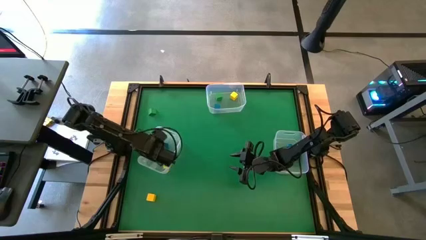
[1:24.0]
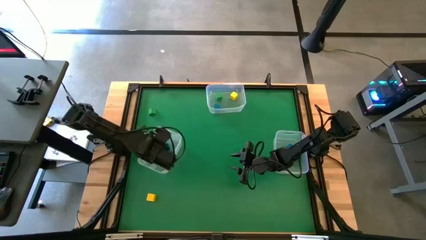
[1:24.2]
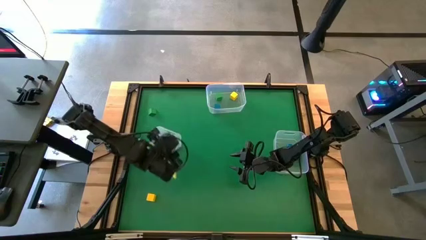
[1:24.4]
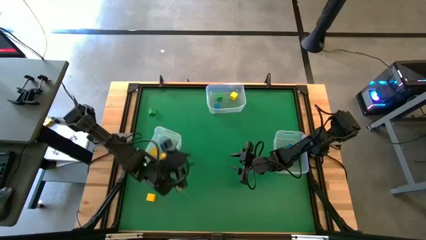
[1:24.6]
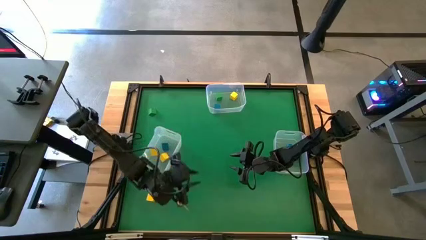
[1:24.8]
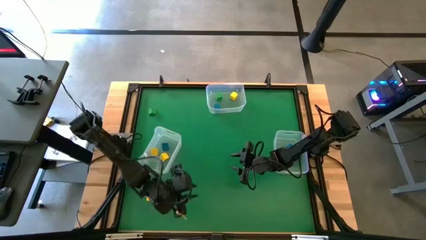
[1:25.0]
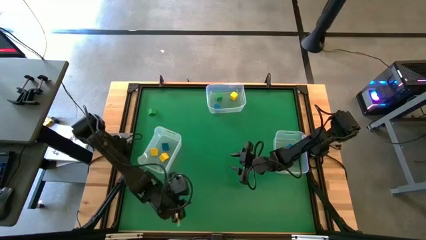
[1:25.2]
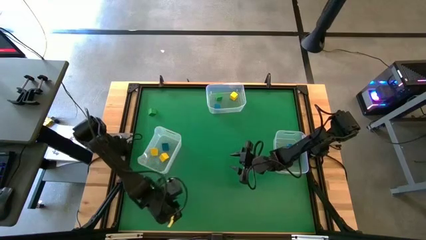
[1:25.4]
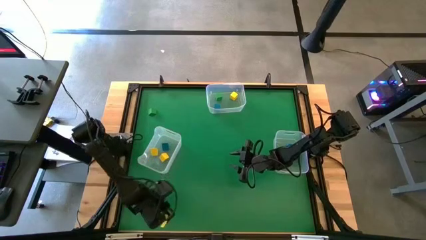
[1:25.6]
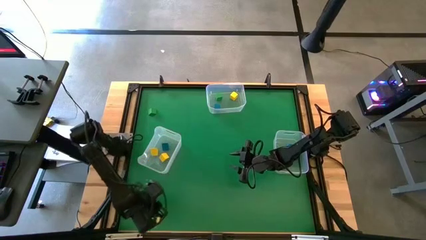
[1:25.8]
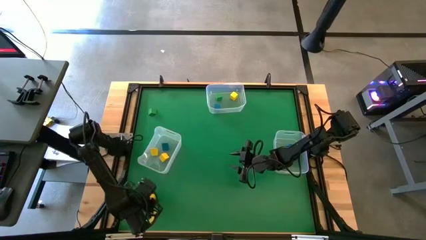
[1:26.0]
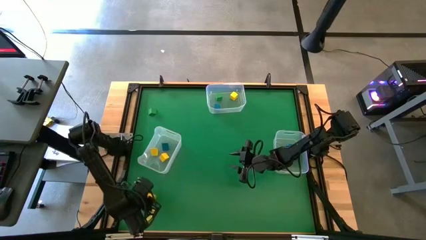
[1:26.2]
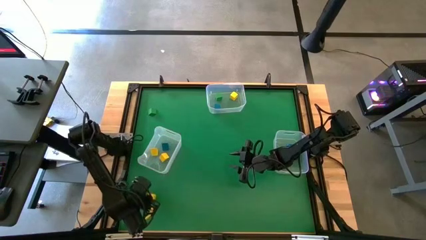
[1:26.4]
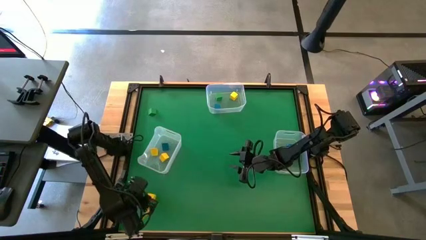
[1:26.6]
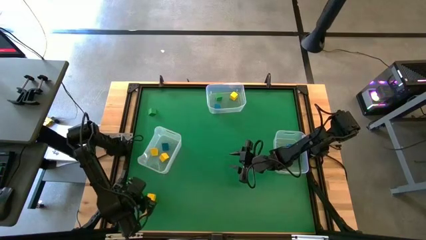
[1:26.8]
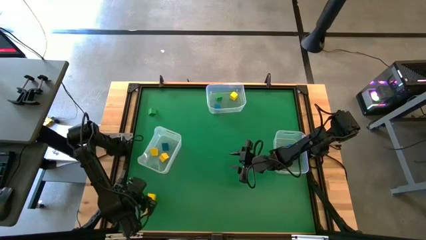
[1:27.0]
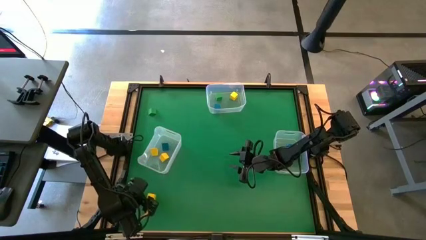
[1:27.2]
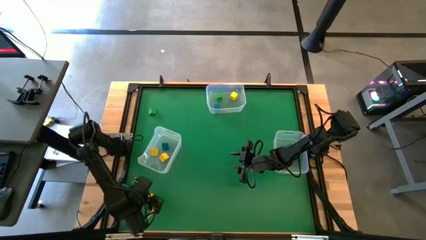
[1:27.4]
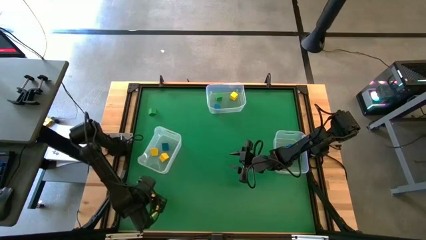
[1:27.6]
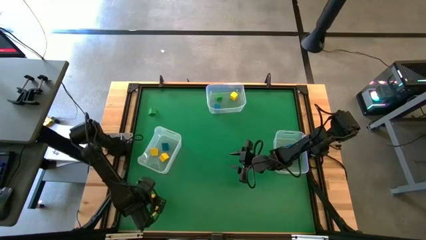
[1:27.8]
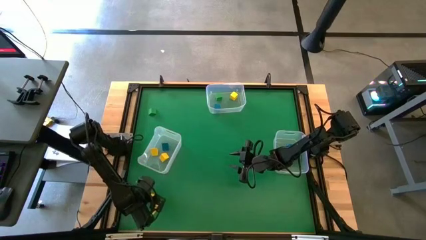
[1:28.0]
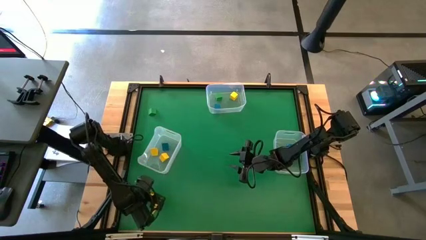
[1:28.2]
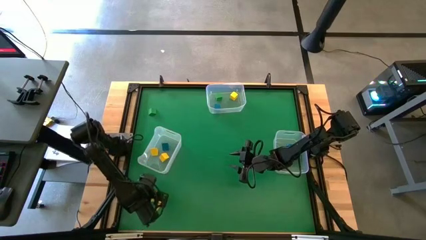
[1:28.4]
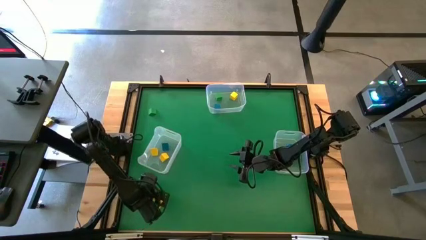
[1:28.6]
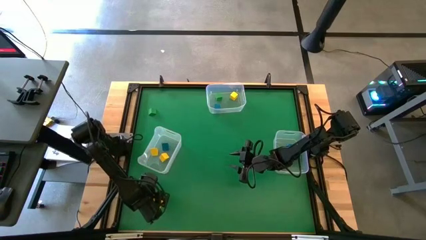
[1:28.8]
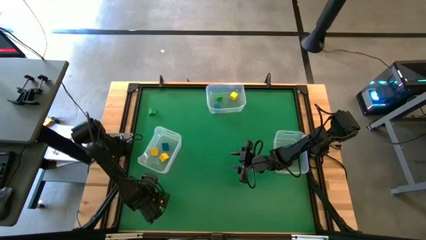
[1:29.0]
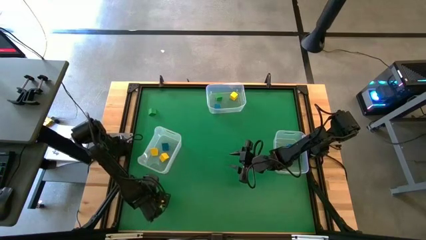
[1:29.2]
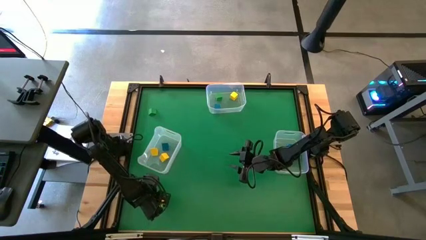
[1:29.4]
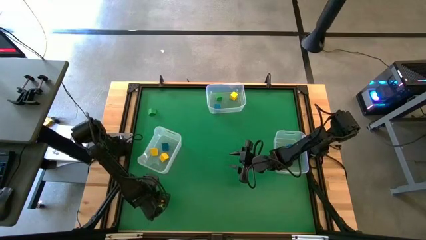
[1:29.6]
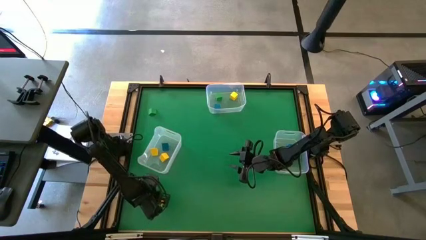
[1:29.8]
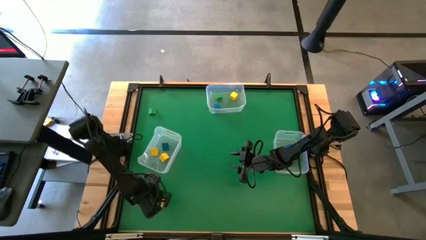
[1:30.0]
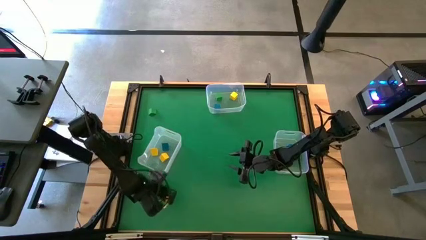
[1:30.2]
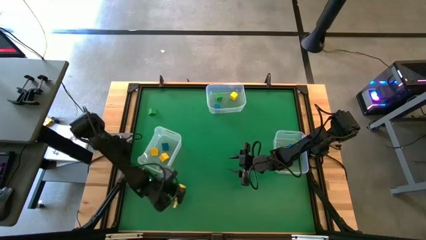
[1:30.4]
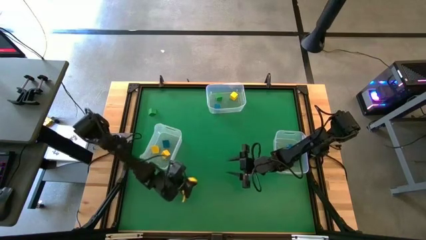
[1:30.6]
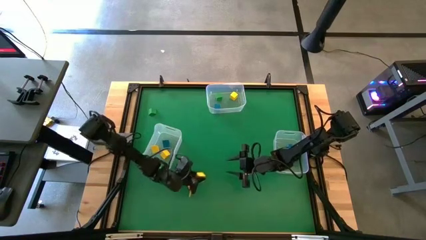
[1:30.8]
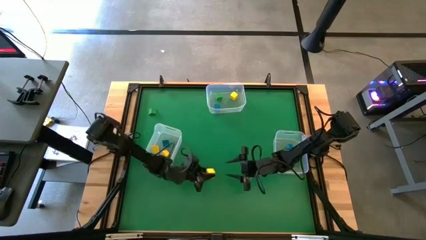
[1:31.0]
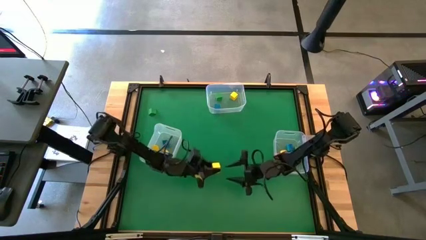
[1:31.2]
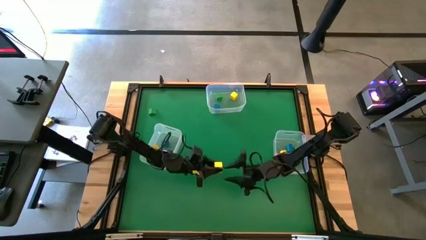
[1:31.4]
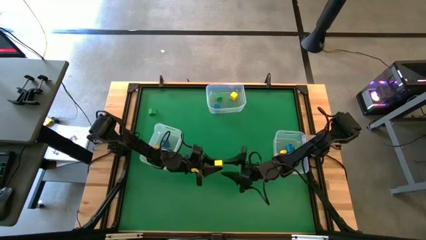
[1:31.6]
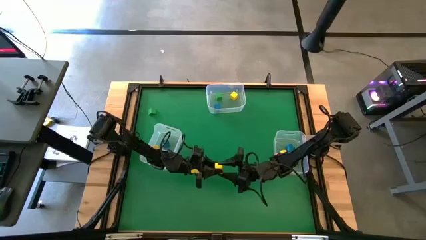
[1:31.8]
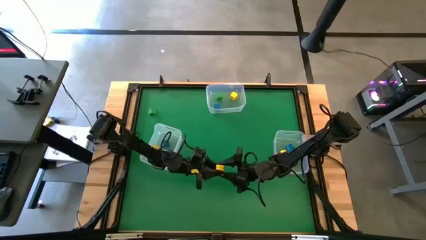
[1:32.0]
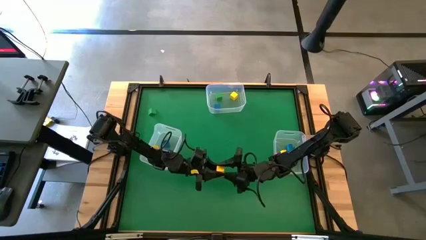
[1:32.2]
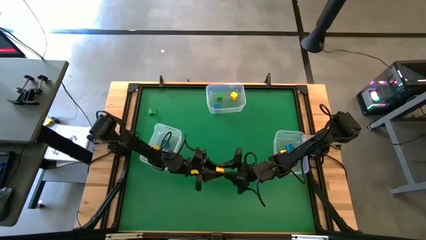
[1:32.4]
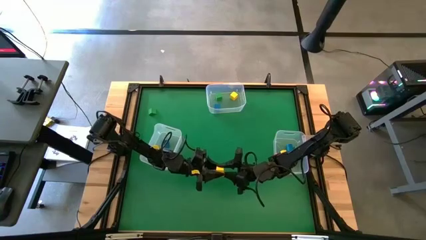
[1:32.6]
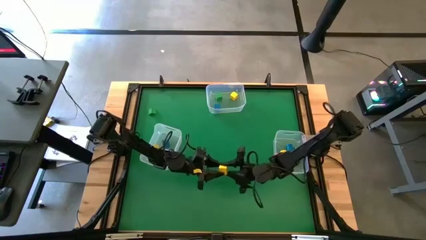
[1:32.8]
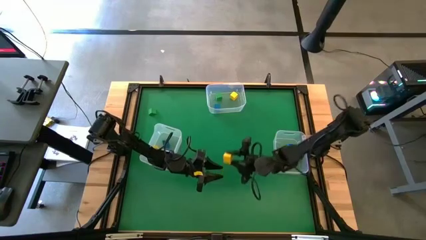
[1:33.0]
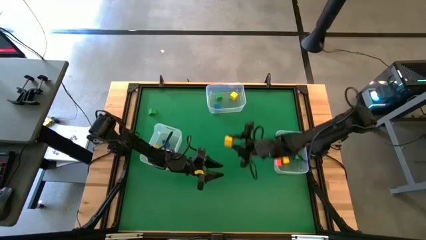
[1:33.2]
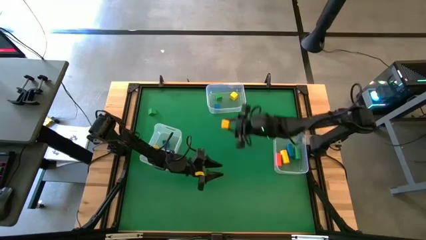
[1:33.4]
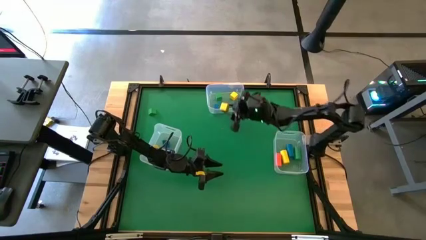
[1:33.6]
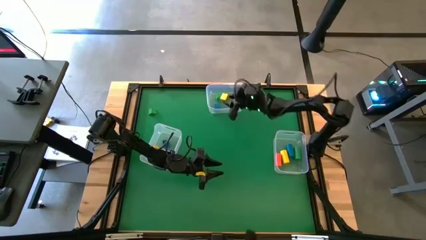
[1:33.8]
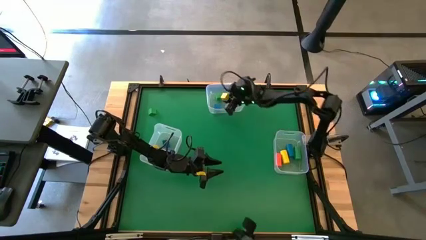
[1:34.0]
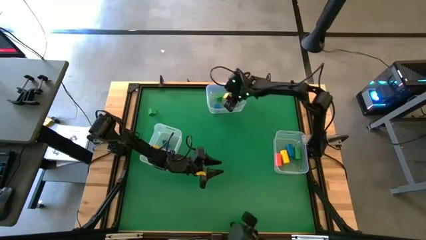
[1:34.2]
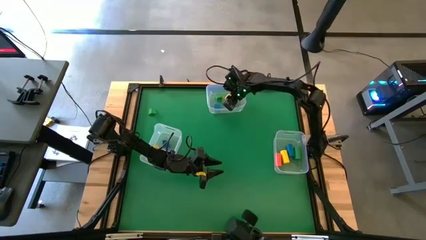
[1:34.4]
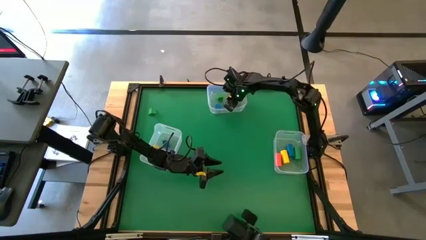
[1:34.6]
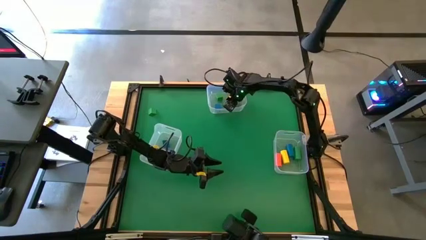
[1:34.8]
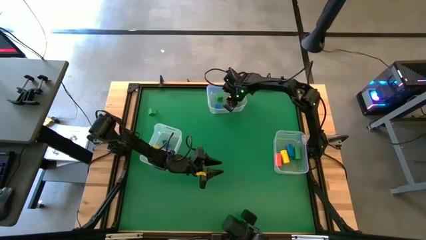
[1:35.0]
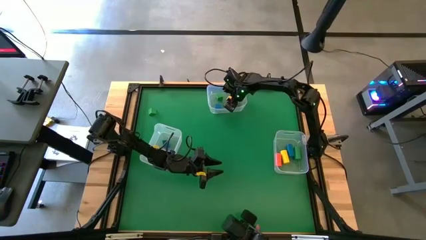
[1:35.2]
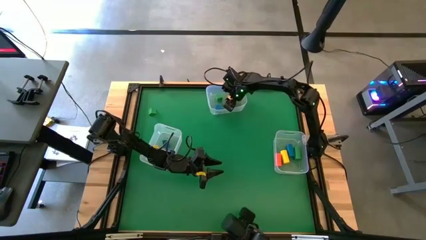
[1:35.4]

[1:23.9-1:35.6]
Task: Sort blocks by size
Put the yellow cube block into the top transparent bin

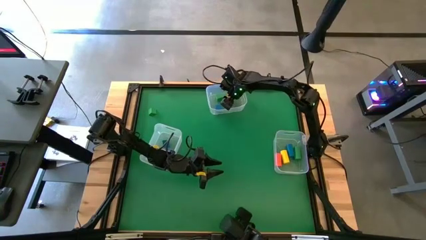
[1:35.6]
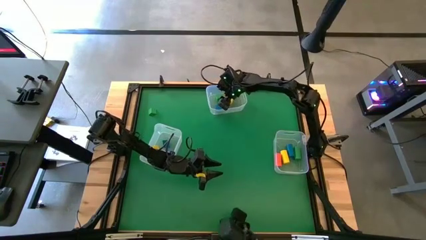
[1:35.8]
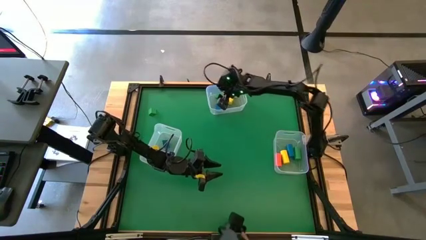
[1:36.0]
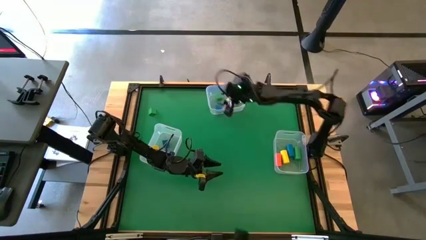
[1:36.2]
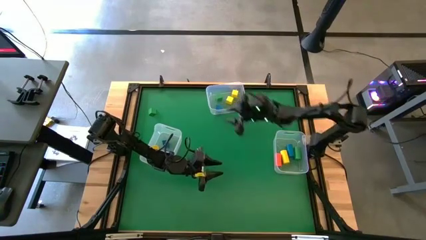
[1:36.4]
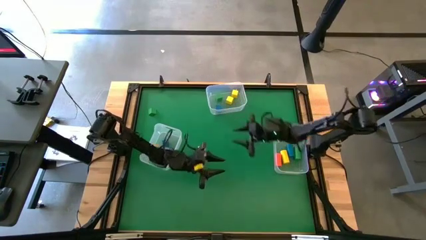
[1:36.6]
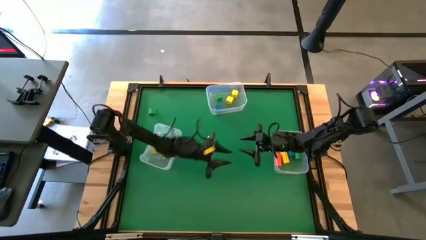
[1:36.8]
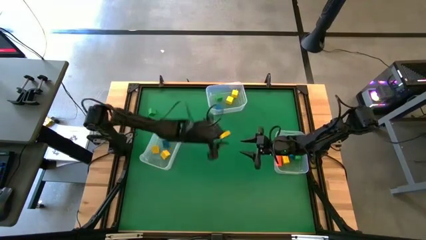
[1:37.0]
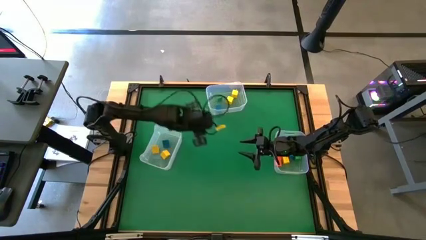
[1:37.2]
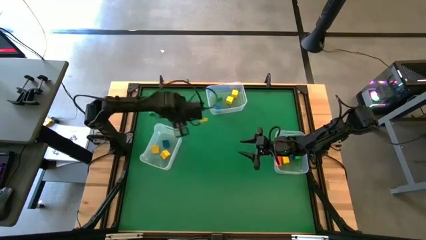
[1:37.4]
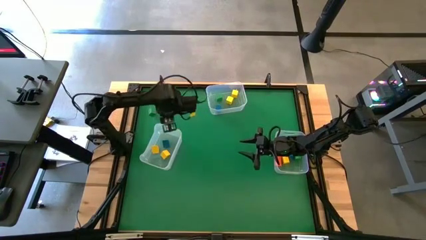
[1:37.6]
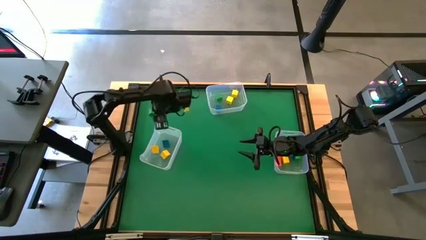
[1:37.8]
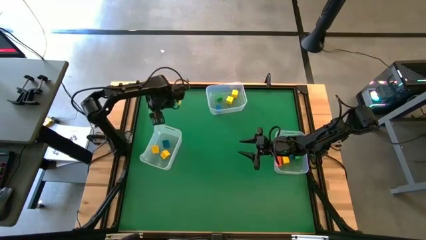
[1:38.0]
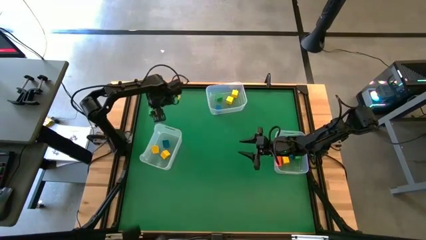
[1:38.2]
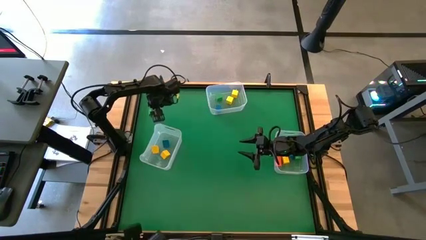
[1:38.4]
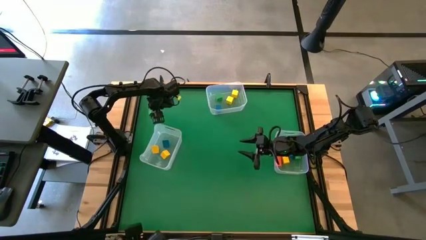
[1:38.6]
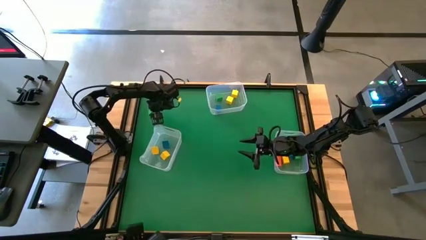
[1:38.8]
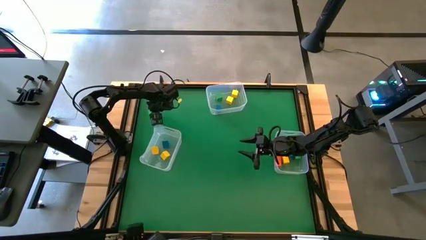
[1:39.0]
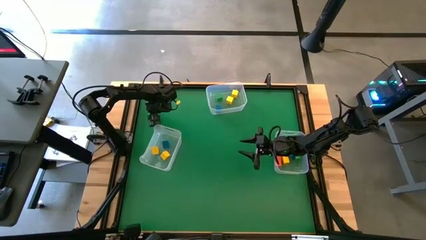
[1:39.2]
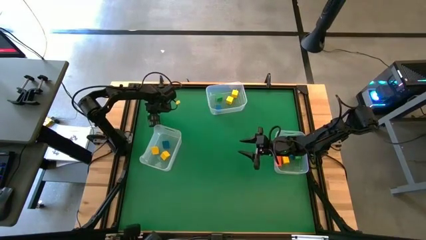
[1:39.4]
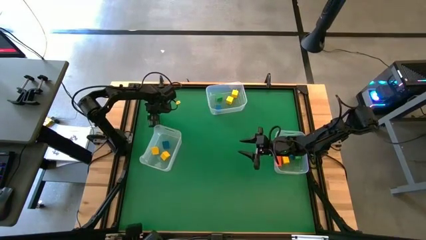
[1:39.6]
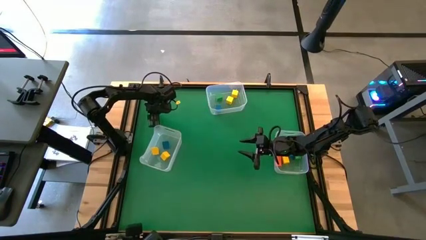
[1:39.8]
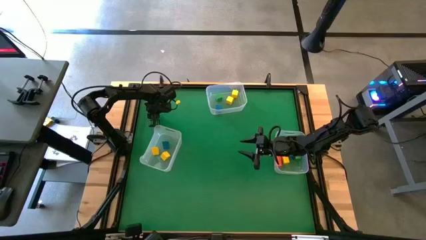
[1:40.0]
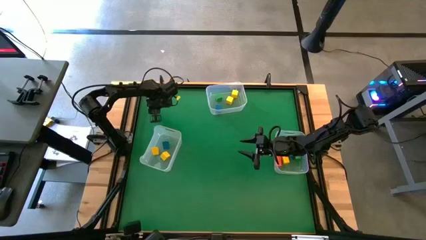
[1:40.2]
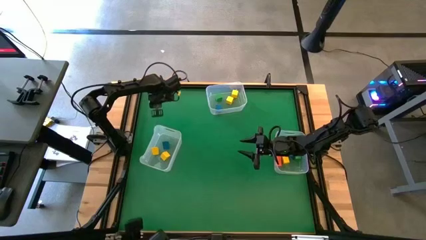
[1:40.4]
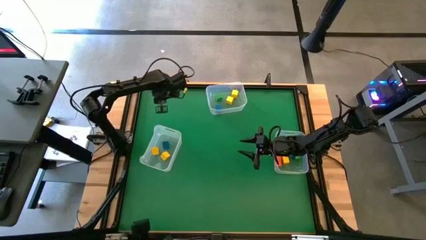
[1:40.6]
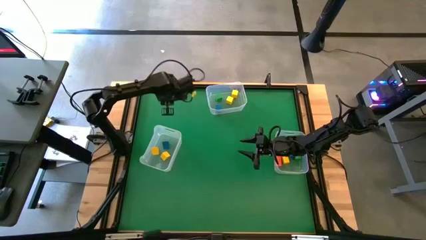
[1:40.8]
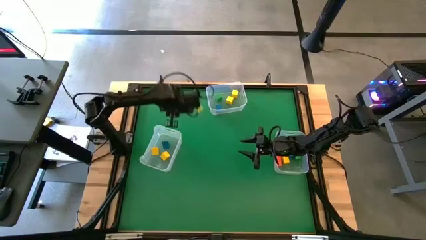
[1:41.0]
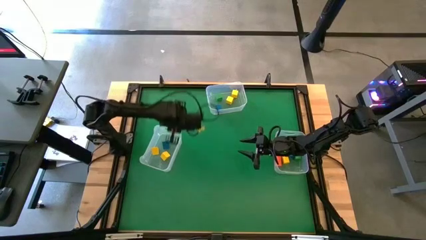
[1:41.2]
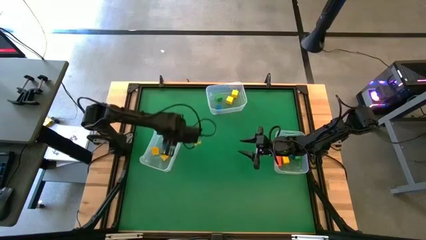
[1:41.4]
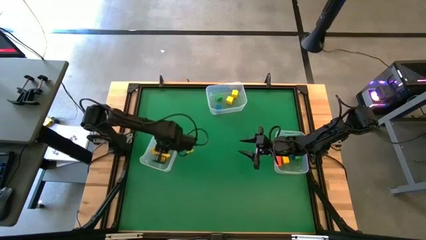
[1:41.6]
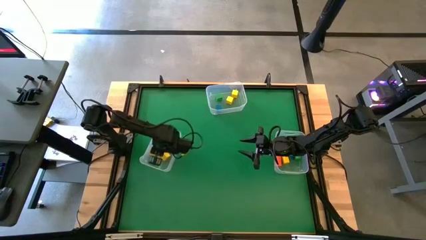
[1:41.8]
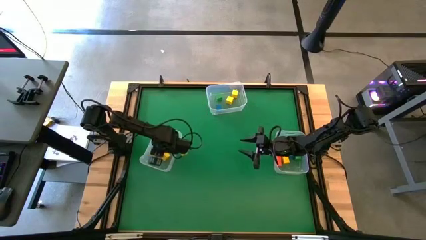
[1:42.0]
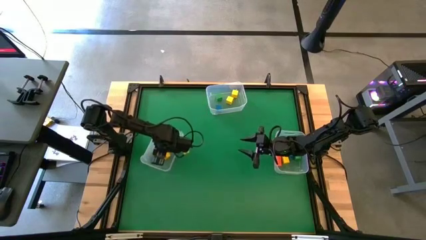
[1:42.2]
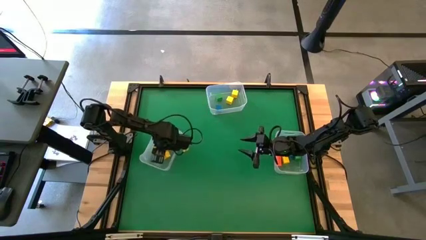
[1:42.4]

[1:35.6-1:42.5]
Put the green triangular block into the bottom left transparent bin
